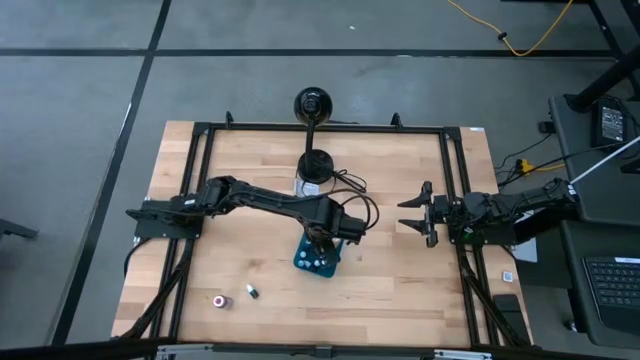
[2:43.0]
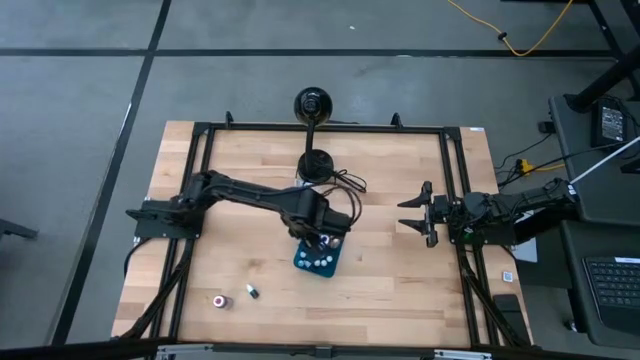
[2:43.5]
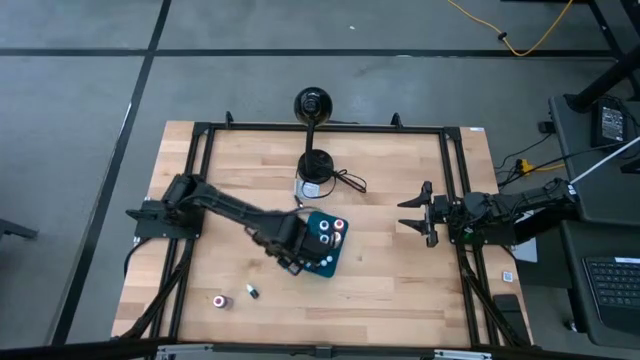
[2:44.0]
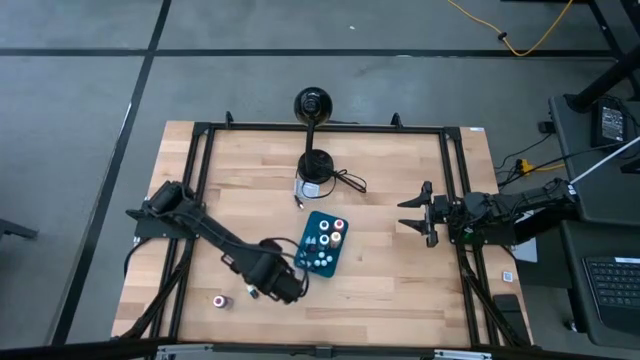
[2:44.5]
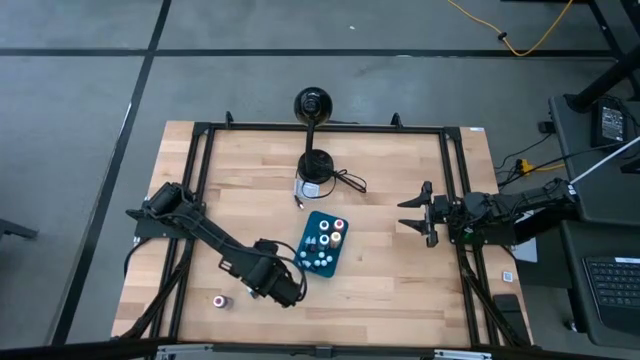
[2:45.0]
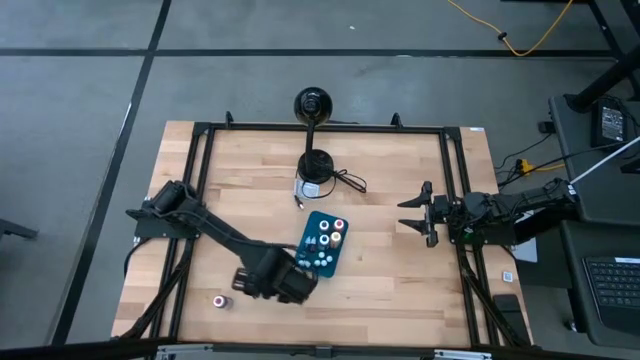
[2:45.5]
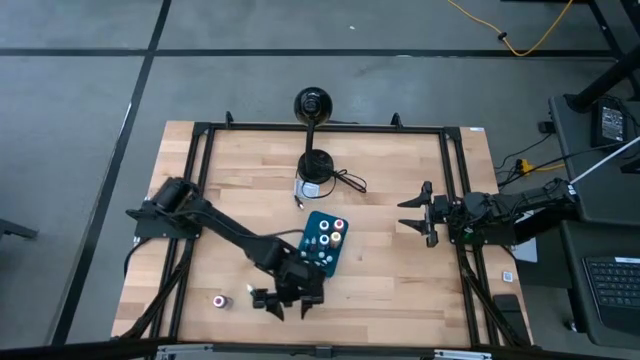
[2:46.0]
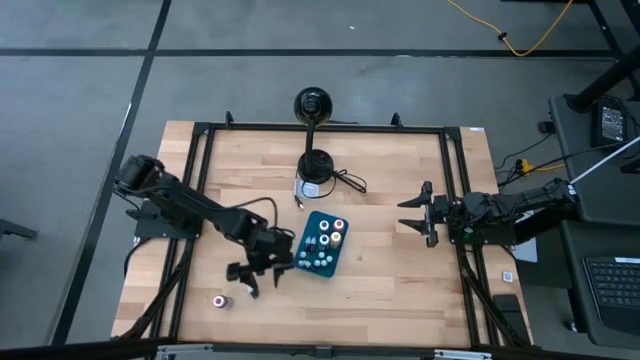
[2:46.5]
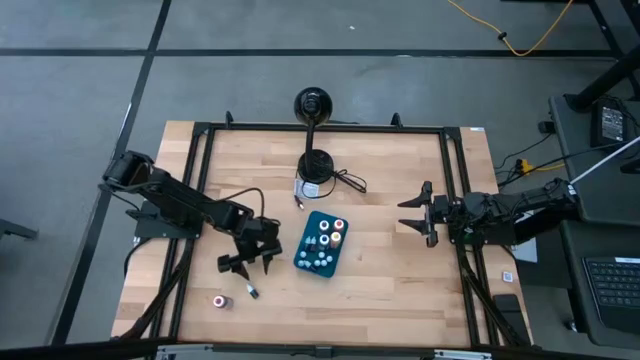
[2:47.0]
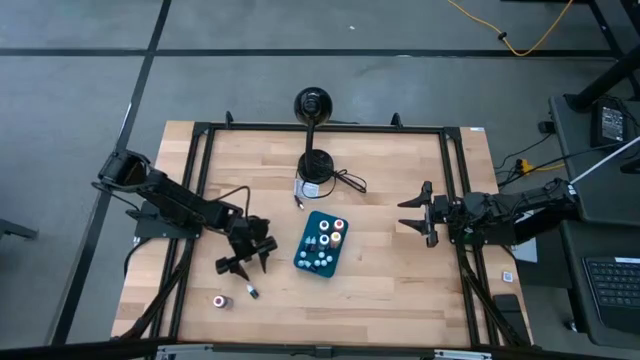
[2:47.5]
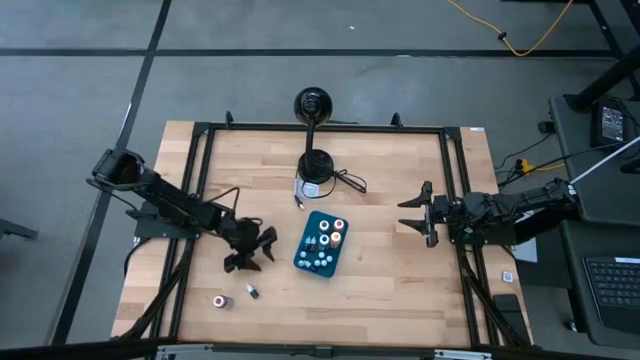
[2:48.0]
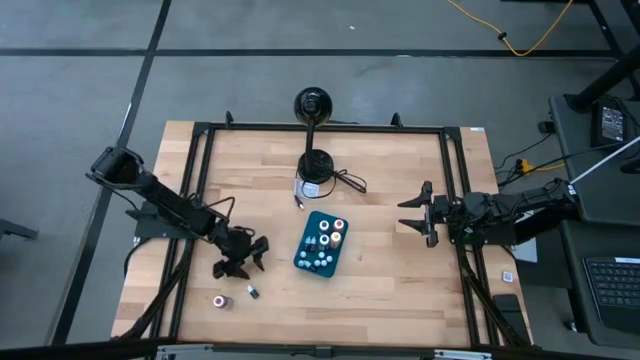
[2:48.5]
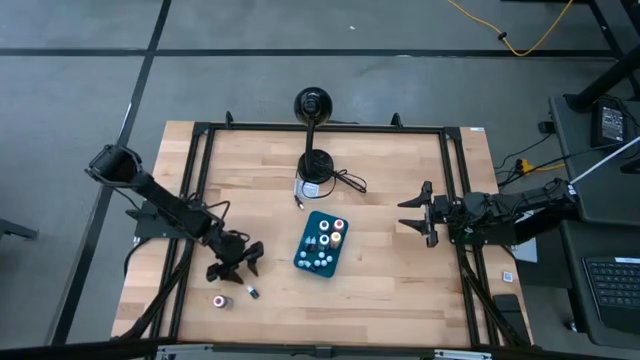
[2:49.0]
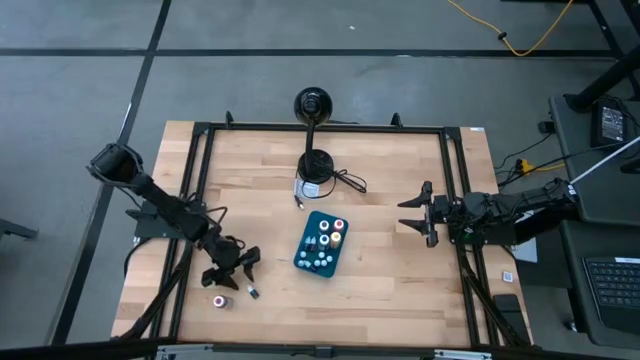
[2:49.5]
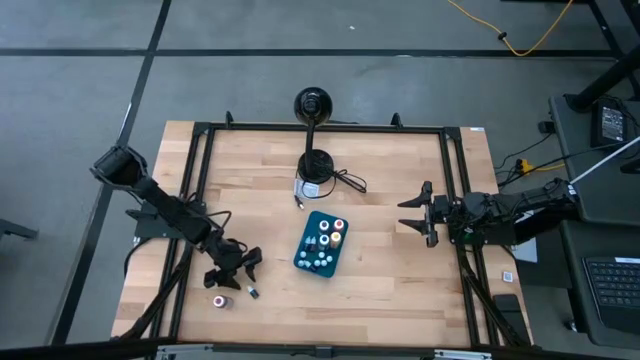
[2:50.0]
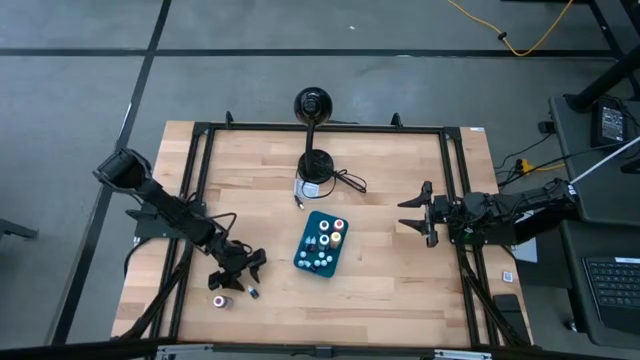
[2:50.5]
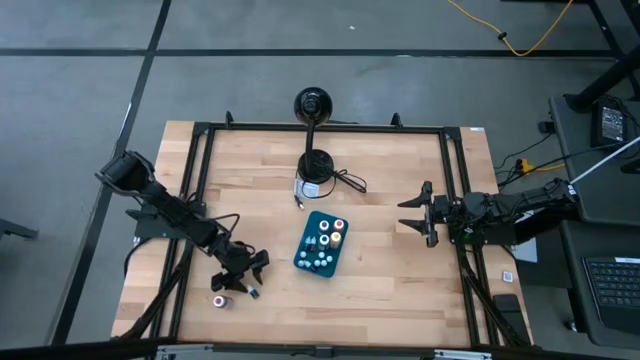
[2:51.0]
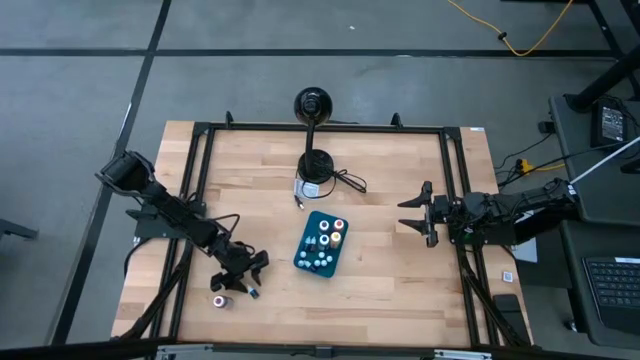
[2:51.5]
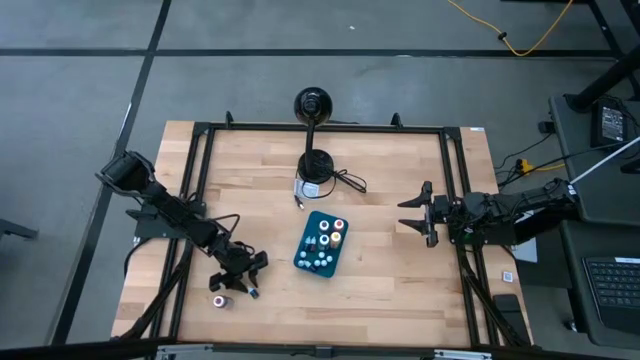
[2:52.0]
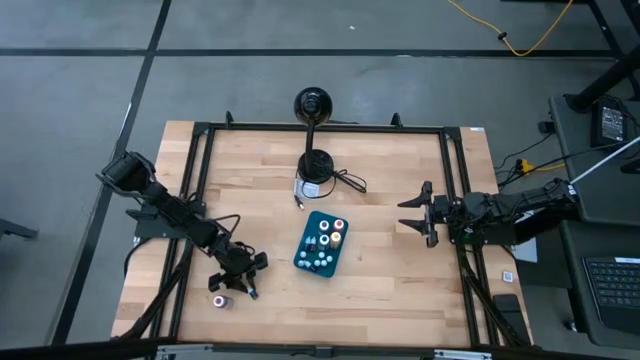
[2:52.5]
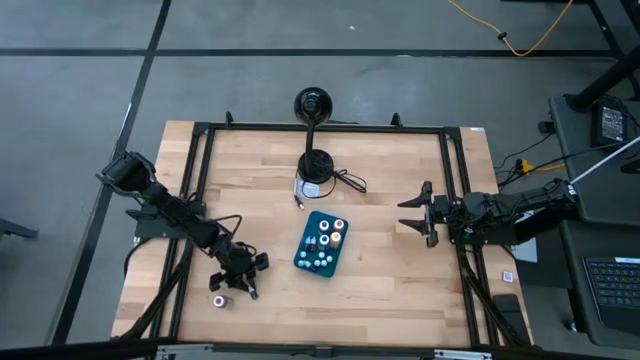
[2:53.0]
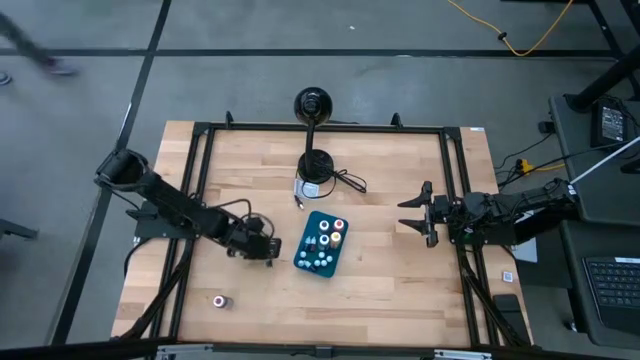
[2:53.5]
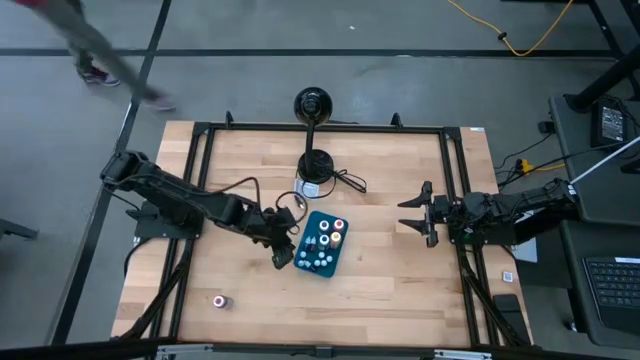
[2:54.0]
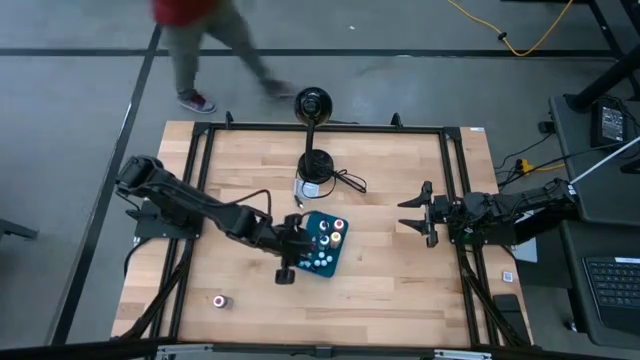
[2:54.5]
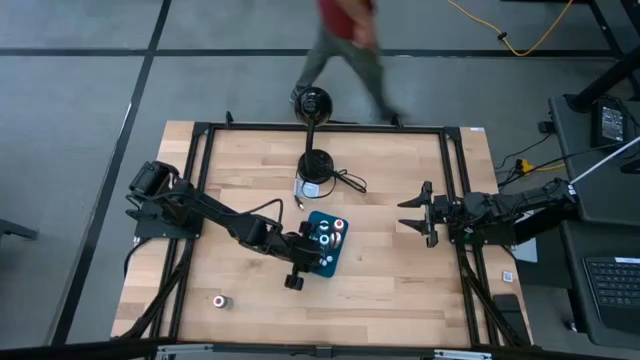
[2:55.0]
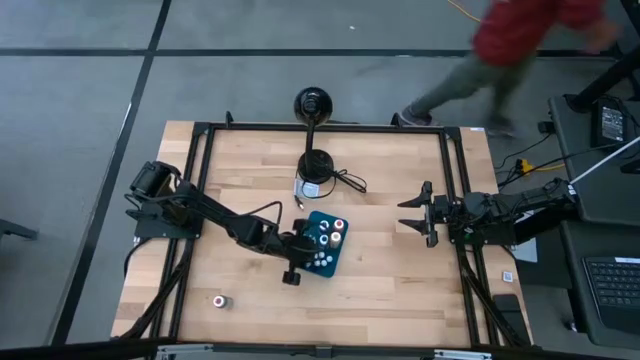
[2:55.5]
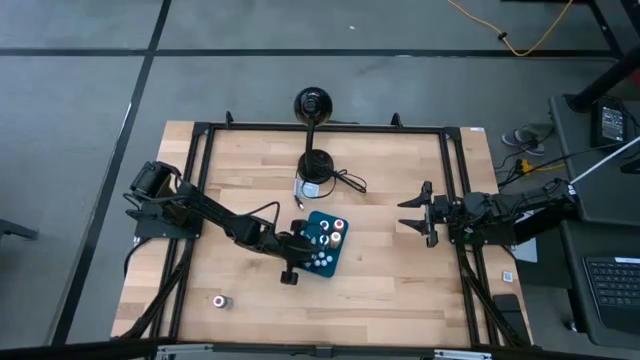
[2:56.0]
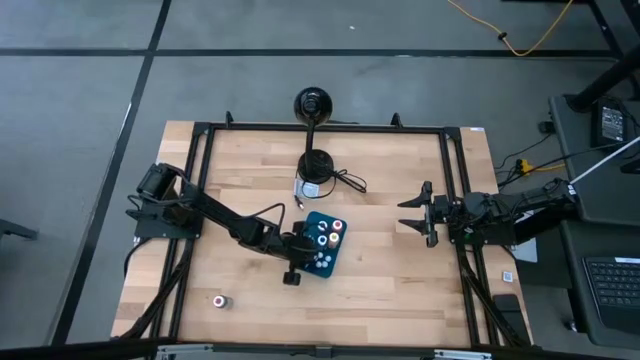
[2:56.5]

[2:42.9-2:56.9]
Task: Pick & Place food coloring
Put the green small food coloring bottle into the bin

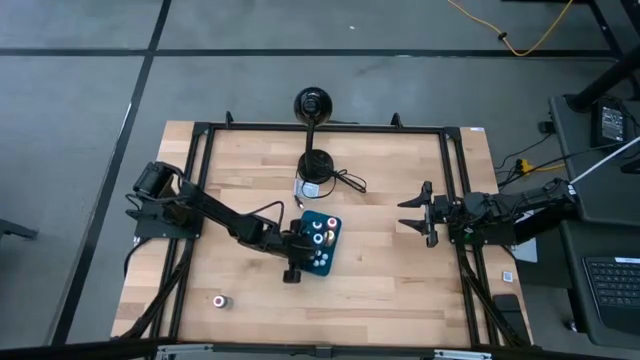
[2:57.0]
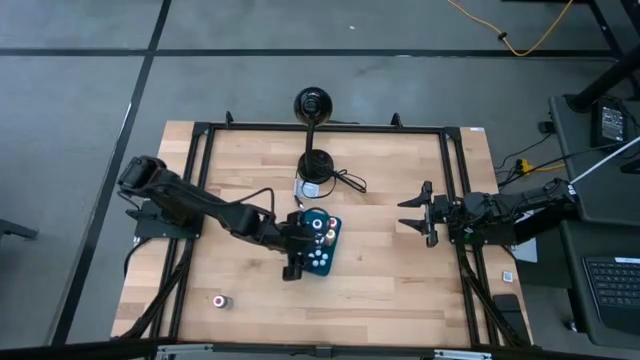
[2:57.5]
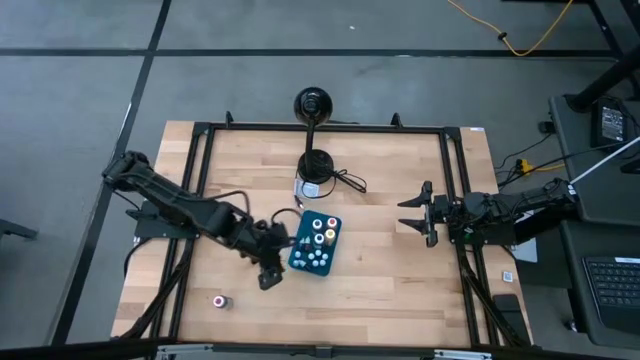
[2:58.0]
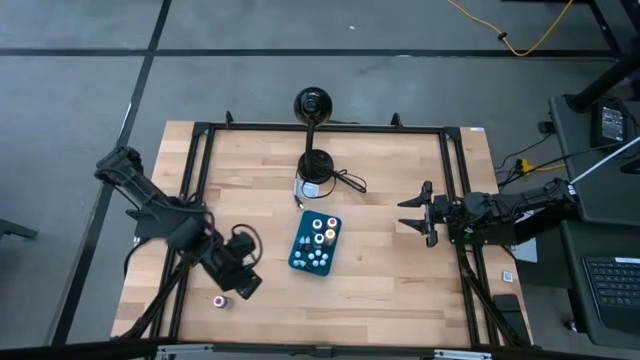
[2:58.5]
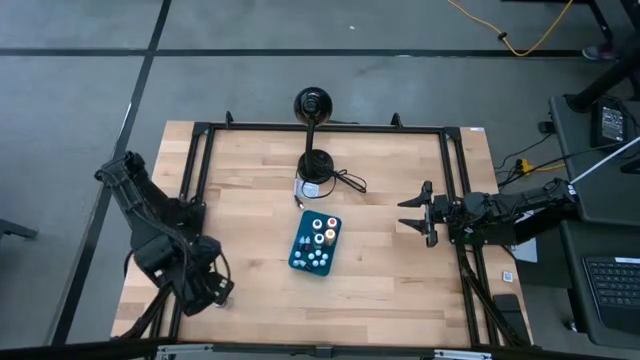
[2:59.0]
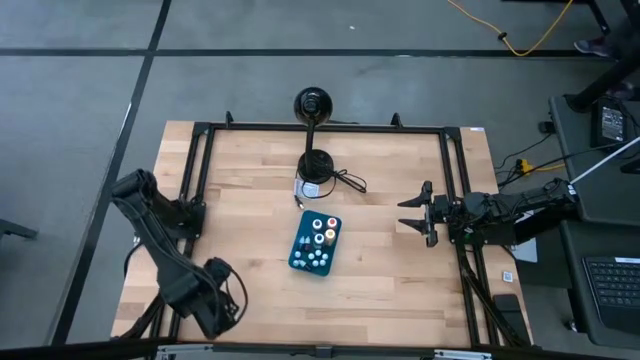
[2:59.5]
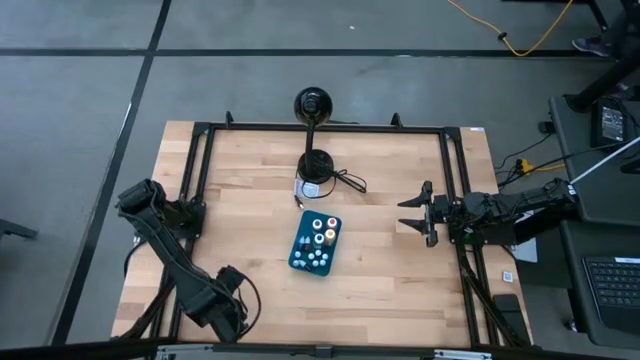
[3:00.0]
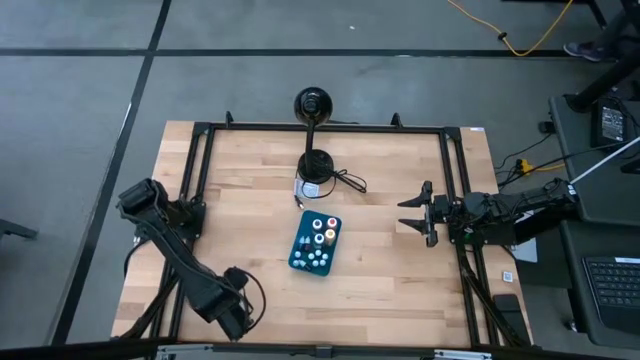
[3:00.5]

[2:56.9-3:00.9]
Put the pink big food coloring bottle into the bin

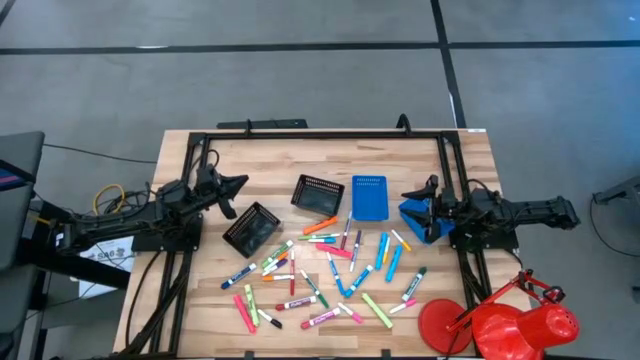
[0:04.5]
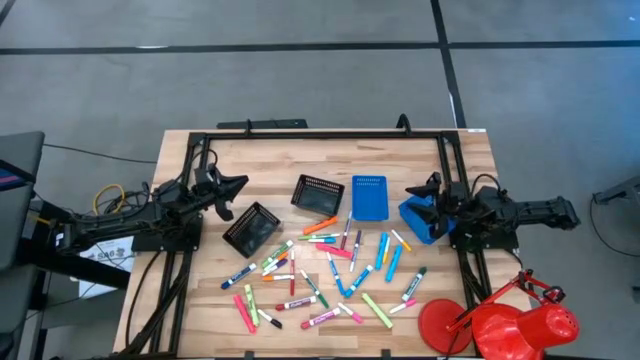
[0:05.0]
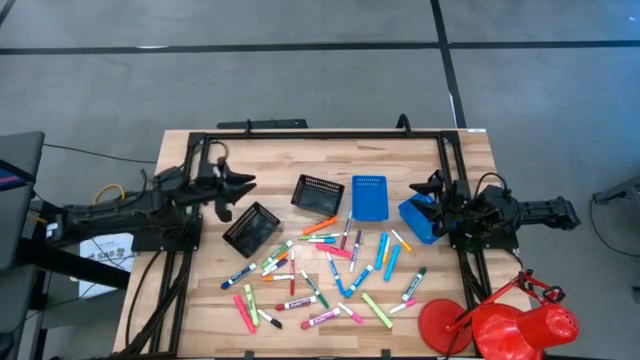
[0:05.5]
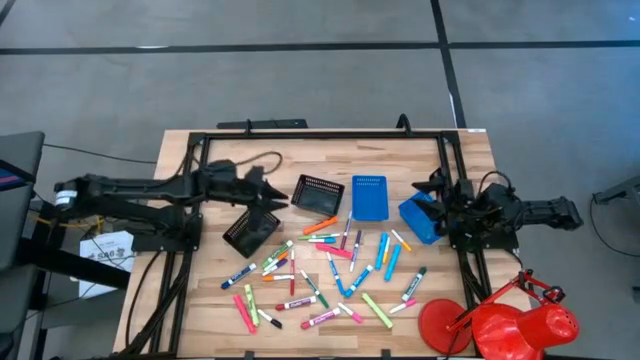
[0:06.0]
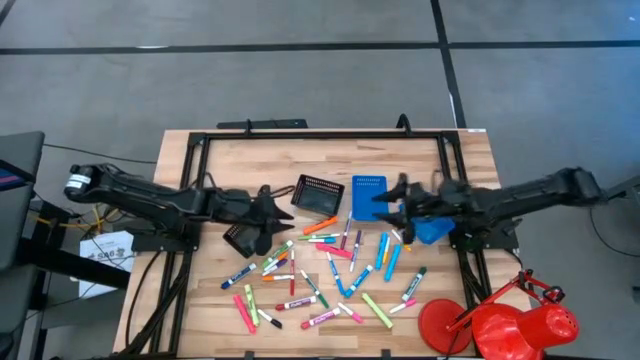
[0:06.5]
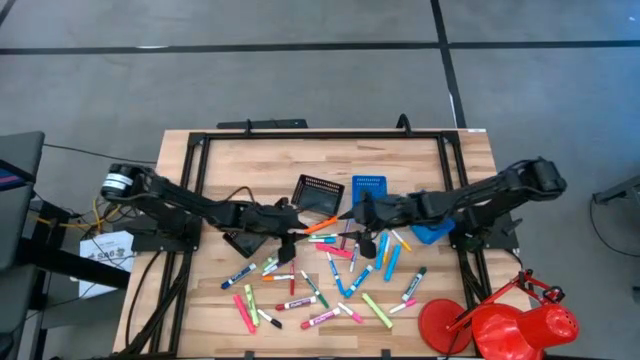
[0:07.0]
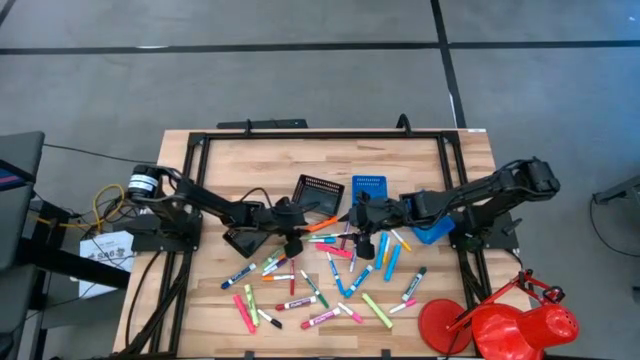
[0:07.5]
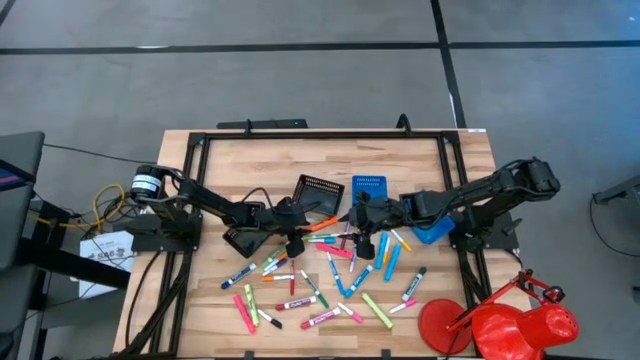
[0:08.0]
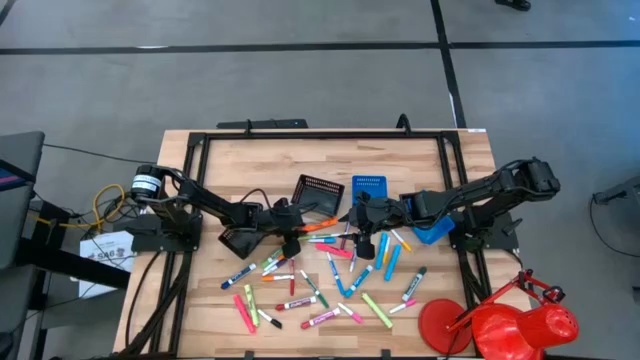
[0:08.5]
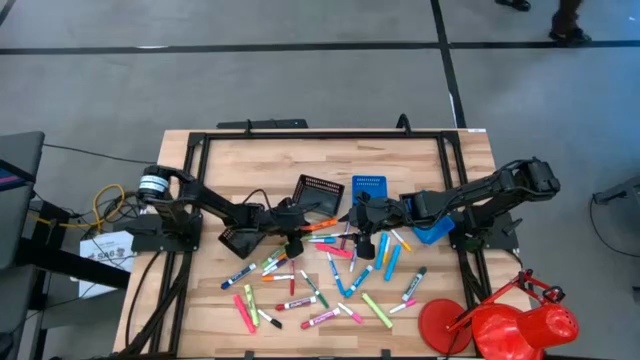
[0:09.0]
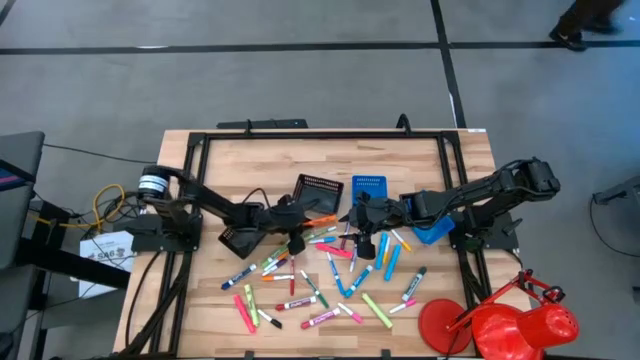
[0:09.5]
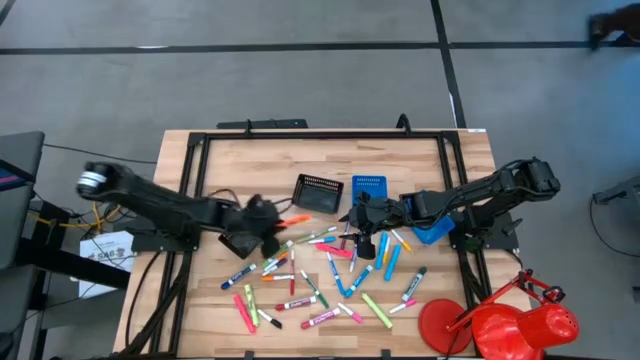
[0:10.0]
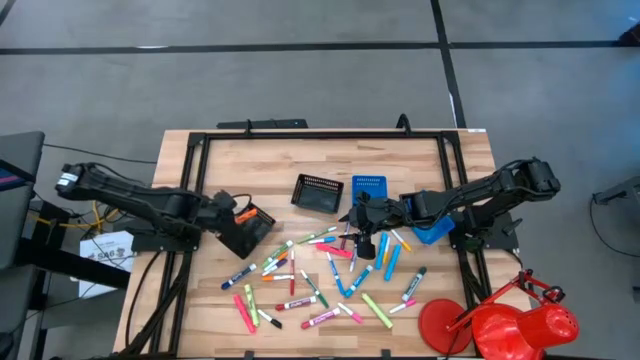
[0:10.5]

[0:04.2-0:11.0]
Task: Pick & Place Markers
Put the orange highlighter into the left black bin
